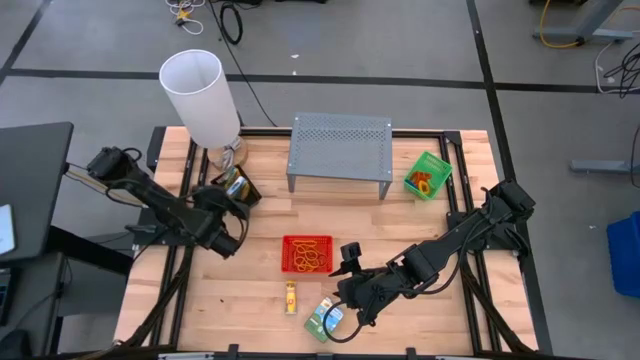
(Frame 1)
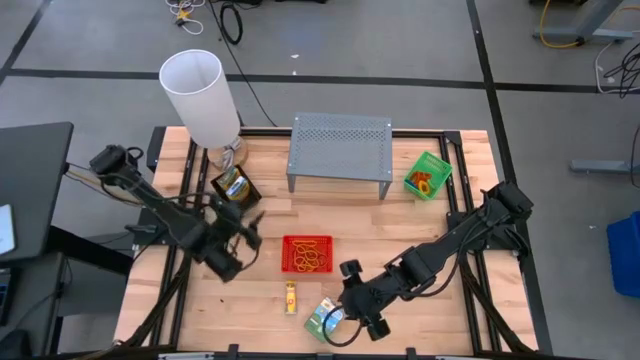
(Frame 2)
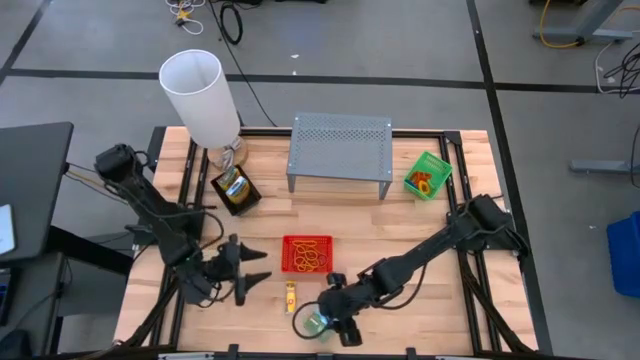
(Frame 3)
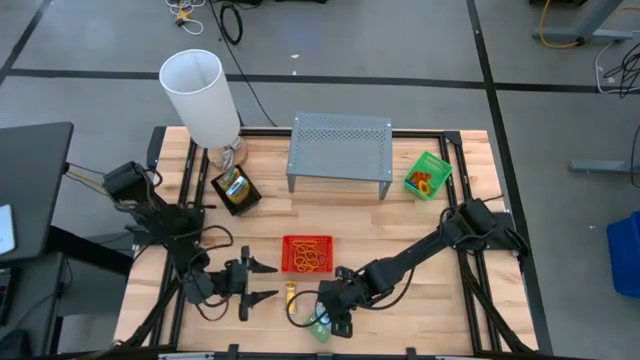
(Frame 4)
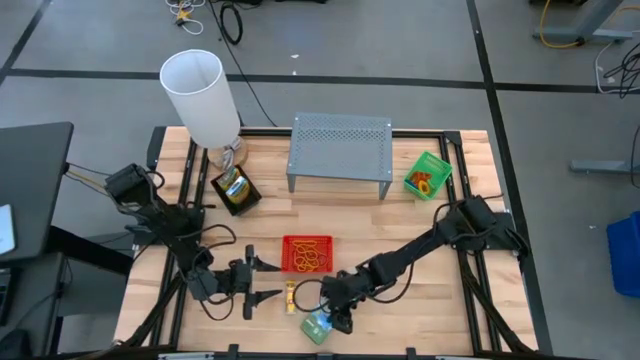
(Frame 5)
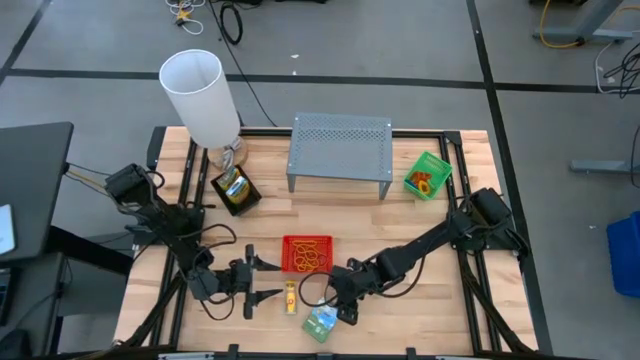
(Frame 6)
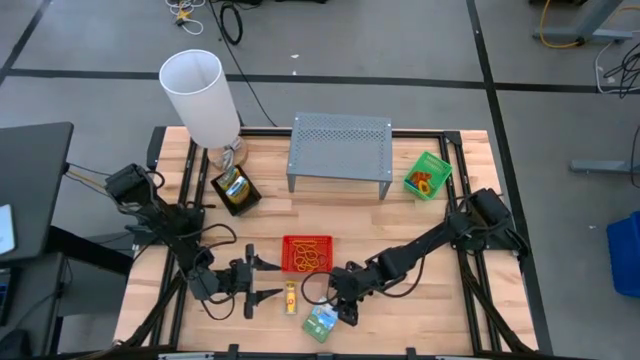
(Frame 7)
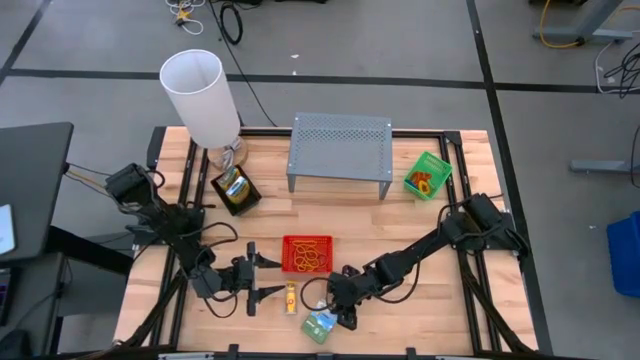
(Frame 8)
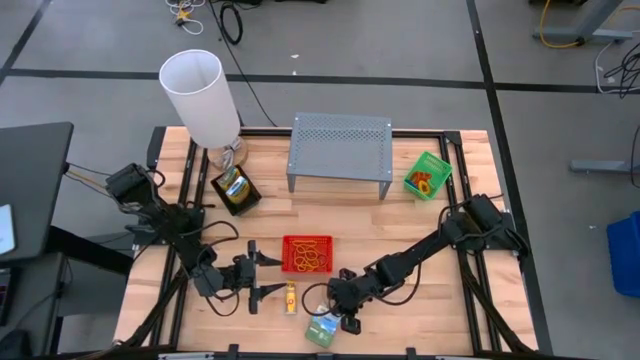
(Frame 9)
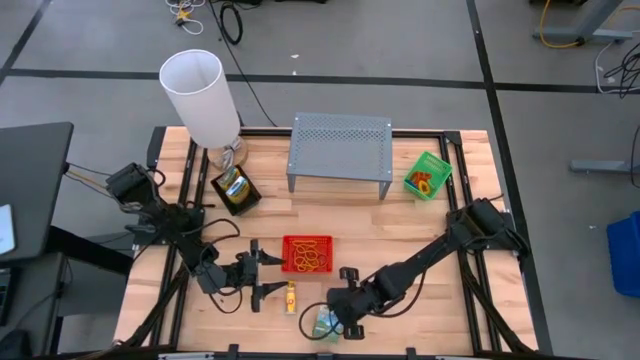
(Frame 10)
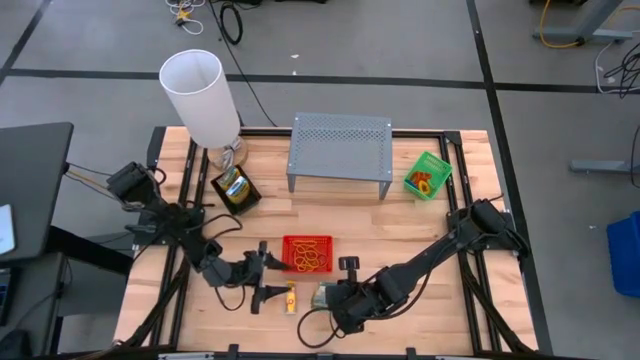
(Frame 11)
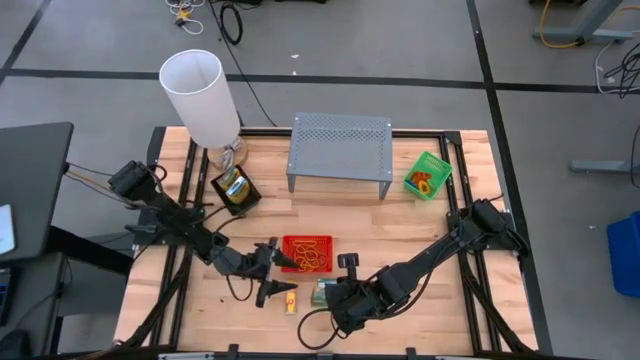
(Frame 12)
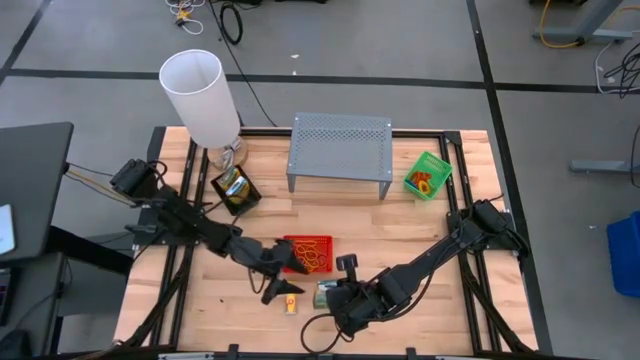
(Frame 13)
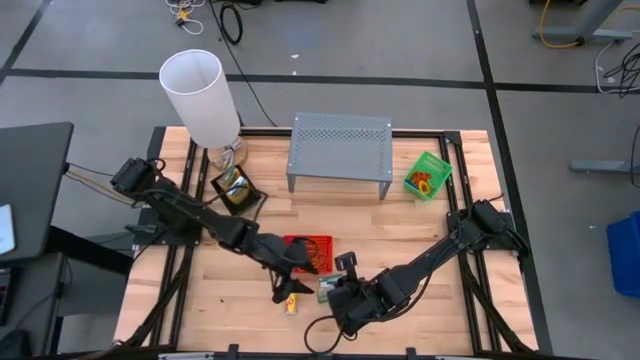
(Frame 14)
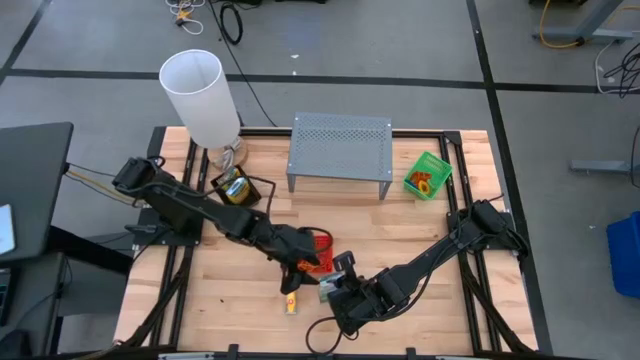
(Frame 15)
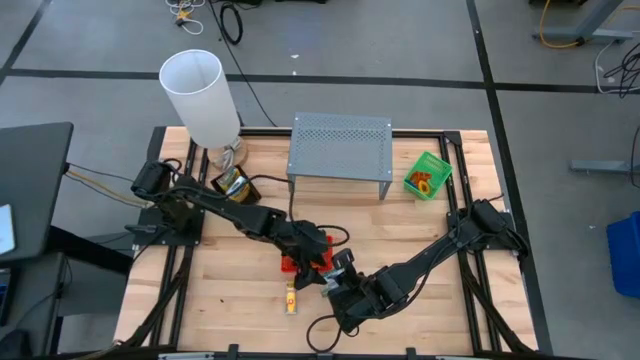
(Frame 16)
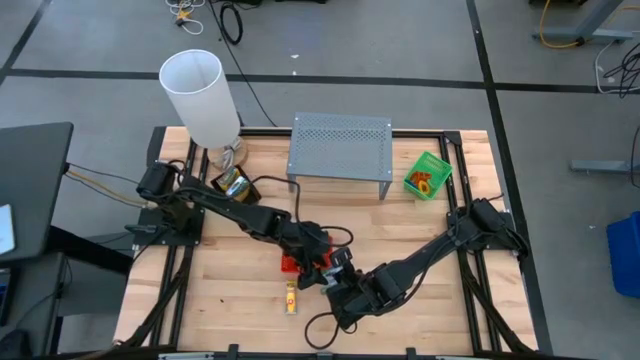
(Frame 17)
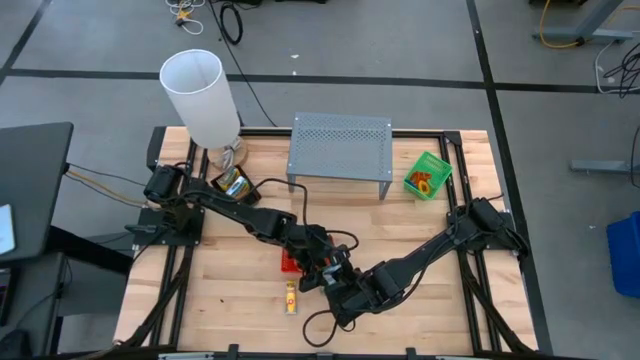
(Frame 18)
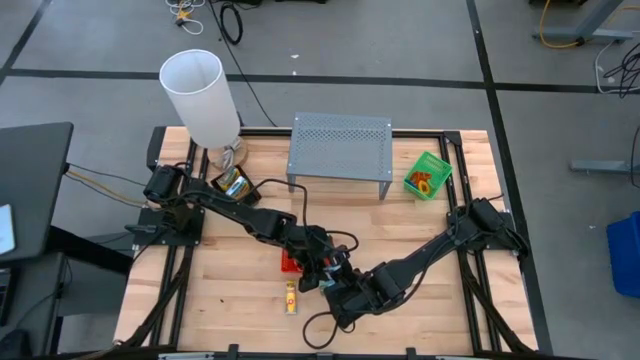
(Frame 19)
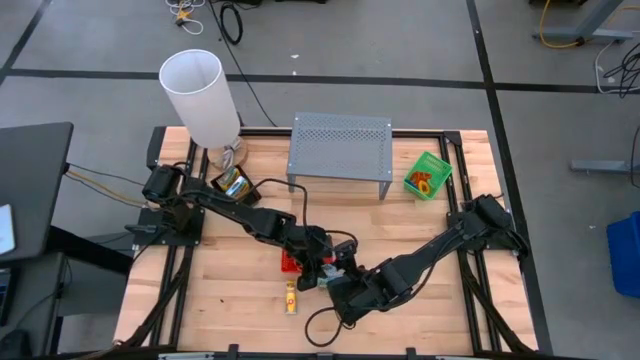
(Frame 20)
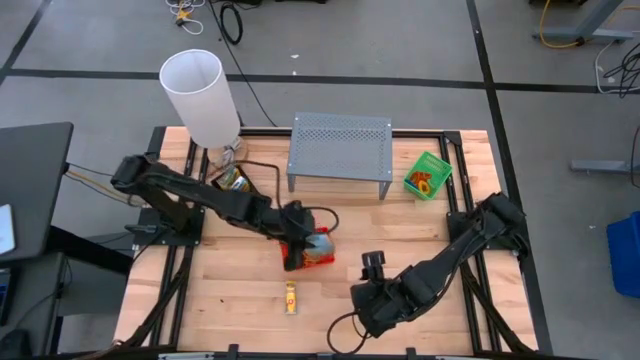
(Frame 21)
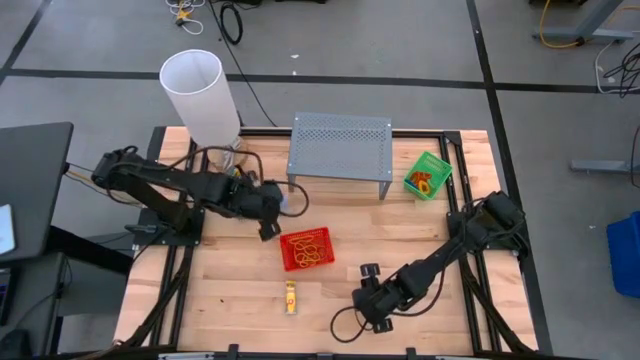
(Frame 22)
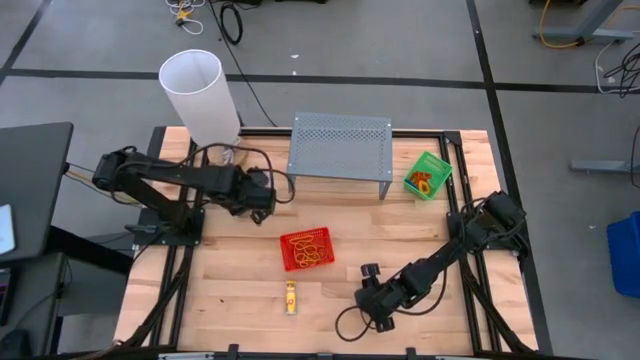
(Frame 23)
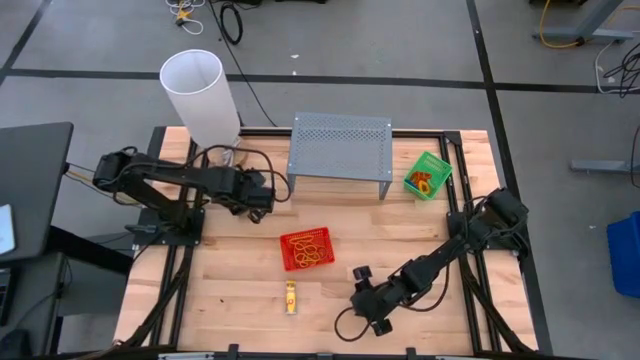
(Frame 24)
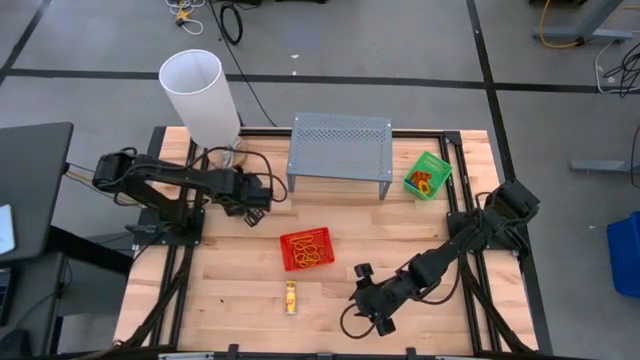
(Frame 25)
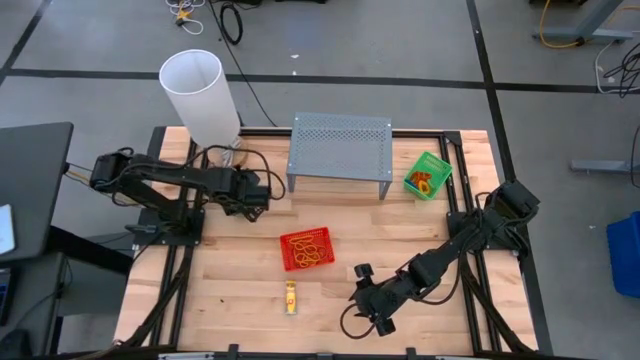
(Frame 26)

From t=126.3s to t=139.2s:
Task: Pick & Place Office Desk Supplies
Put the crayons box into the black bin

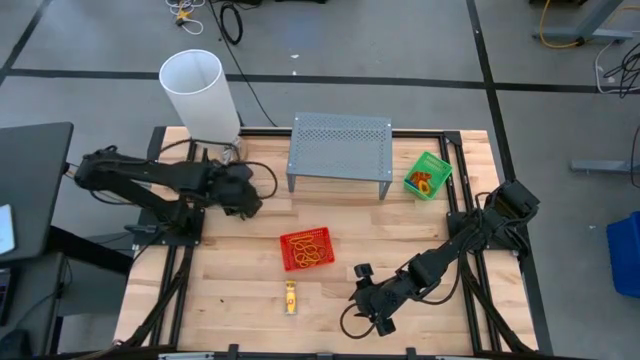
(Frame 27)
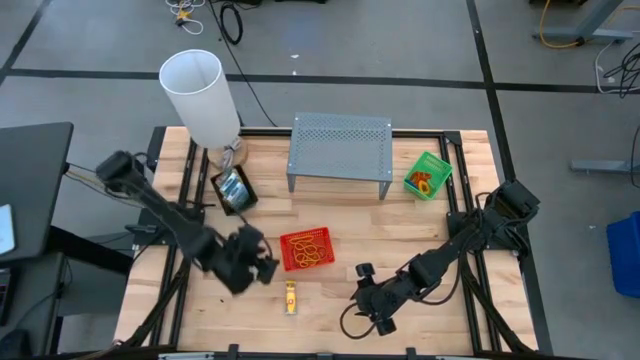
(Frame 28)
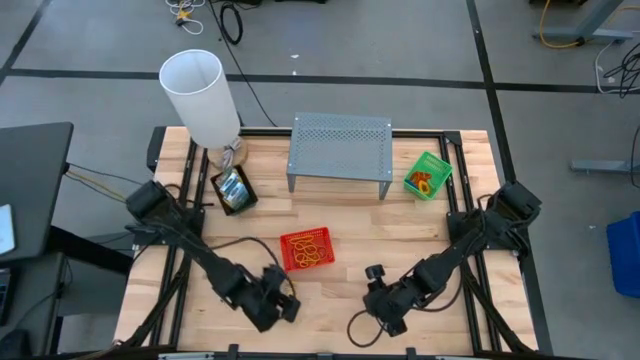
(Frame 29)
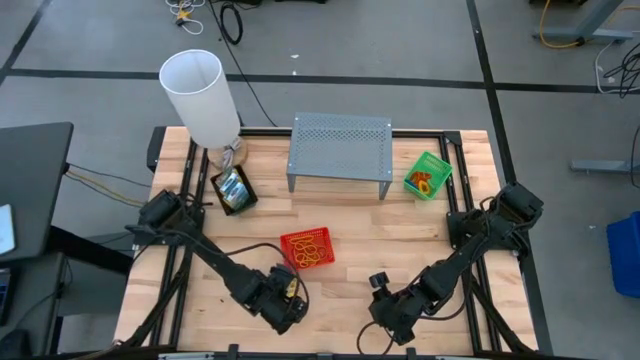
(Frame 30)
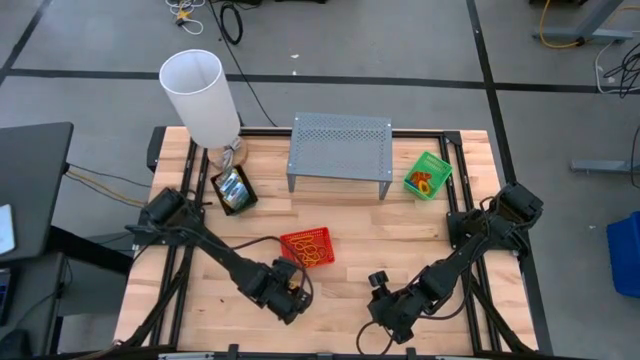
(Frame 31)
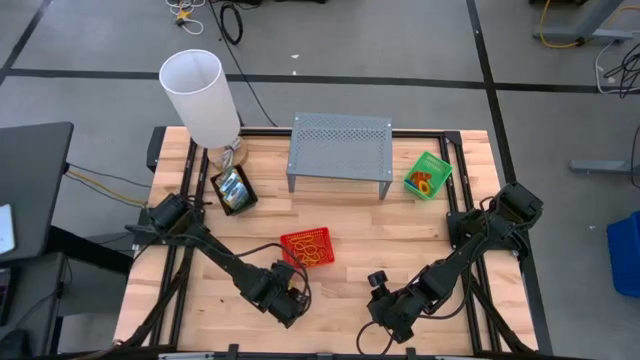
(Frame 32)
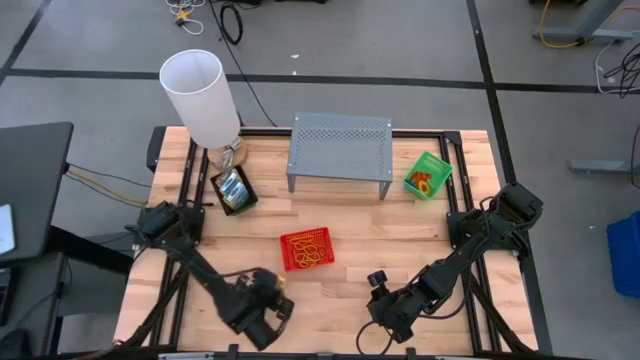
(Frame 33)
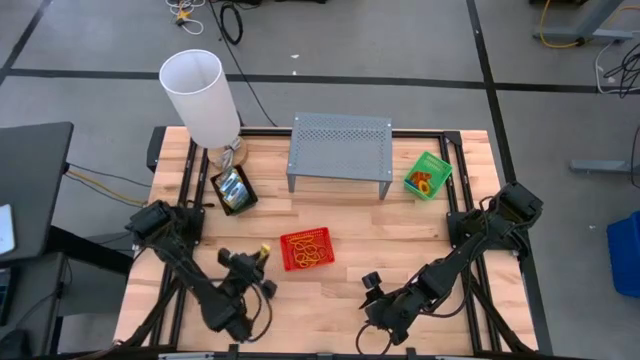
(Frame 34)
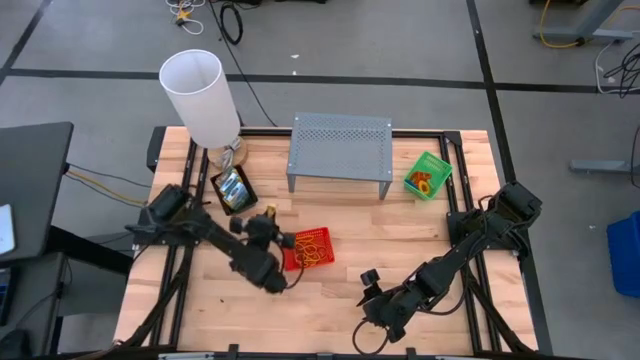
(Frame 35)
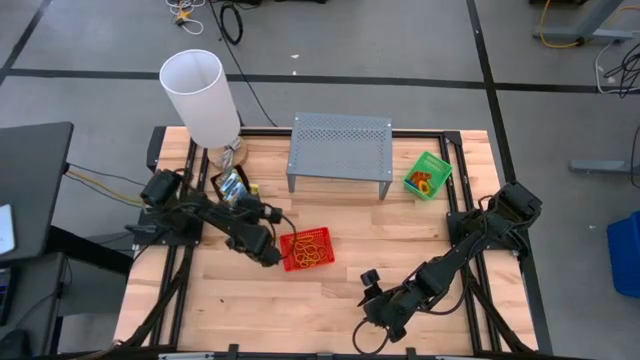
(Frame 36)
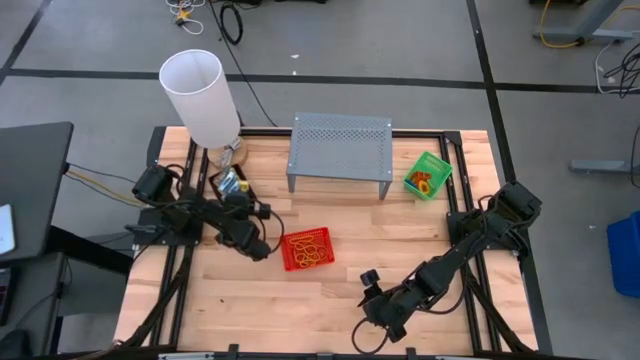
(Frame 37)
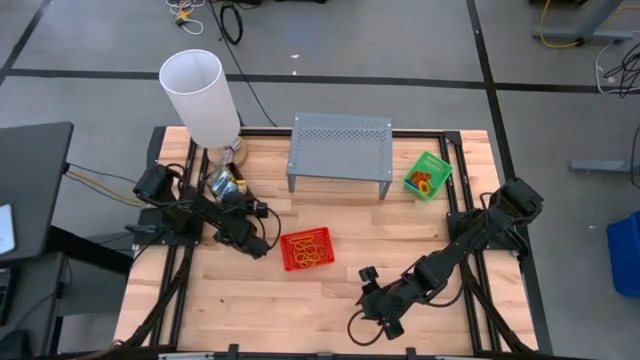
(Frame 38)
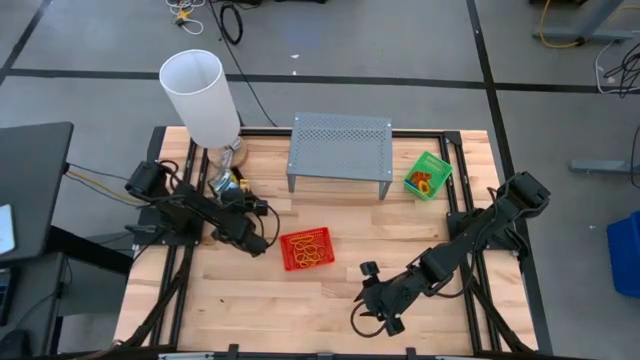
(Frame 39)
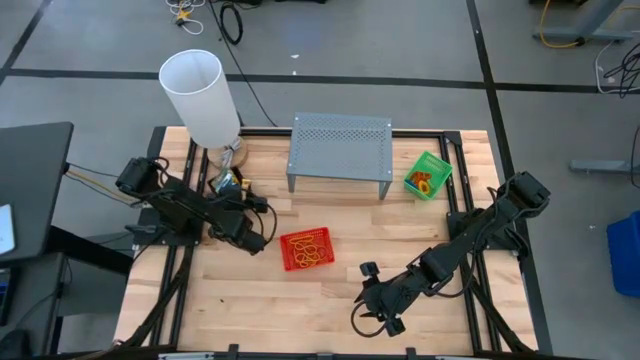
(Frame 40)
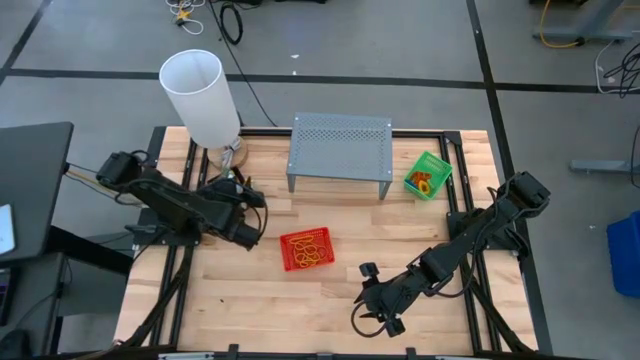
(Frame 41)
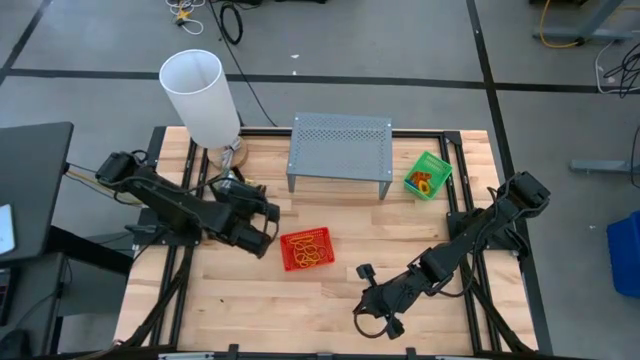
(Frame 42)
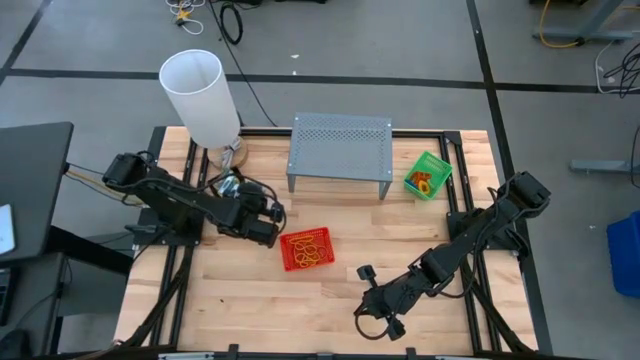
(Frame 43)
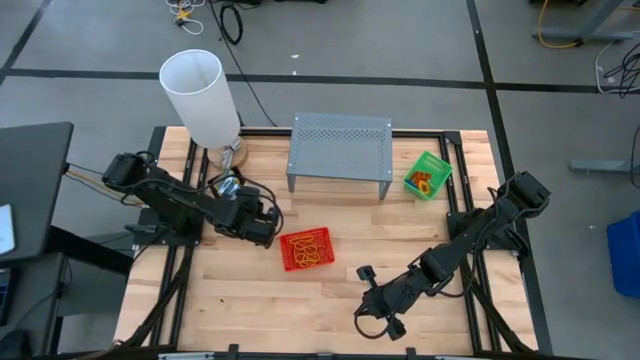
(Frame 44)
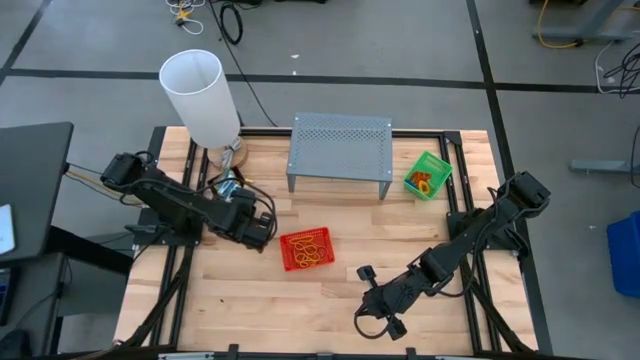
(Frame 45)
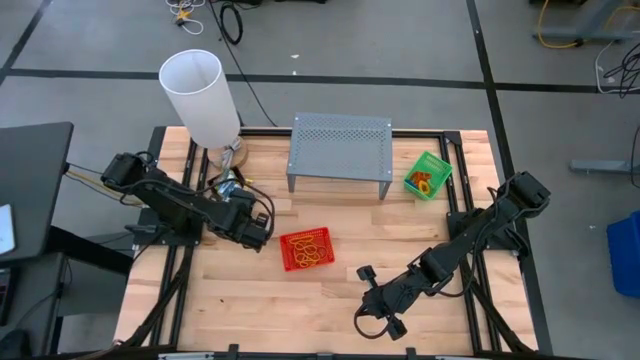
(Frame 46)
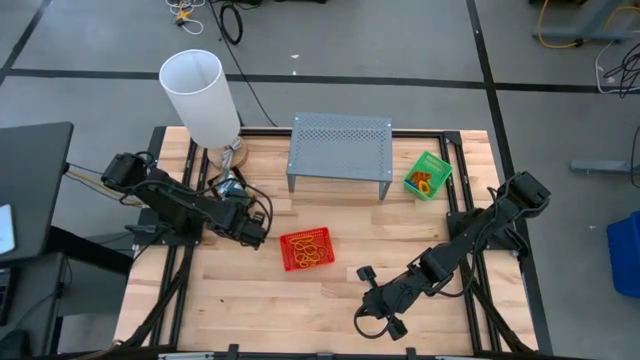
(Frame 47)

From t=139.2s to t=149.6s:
Put the crayons box into the black bin
